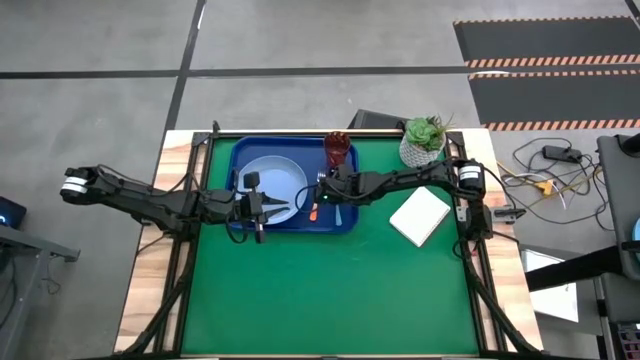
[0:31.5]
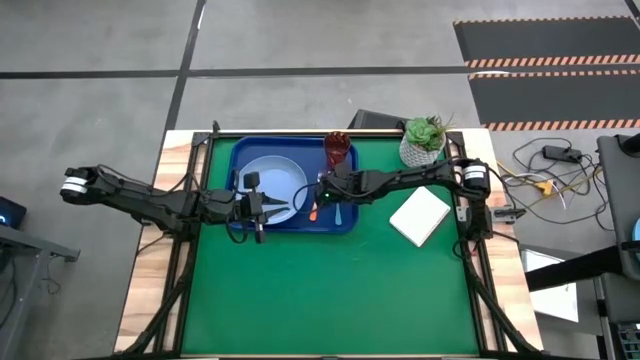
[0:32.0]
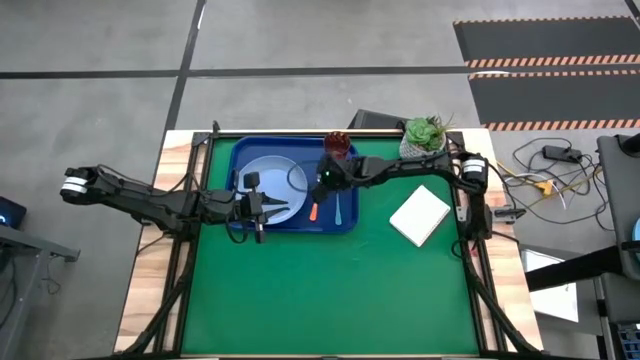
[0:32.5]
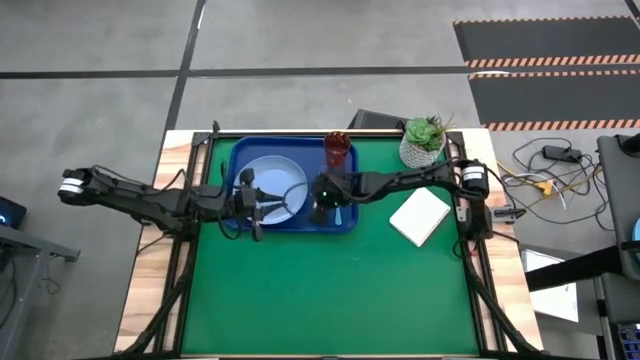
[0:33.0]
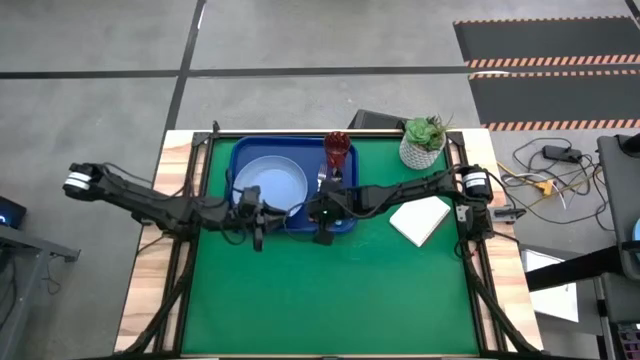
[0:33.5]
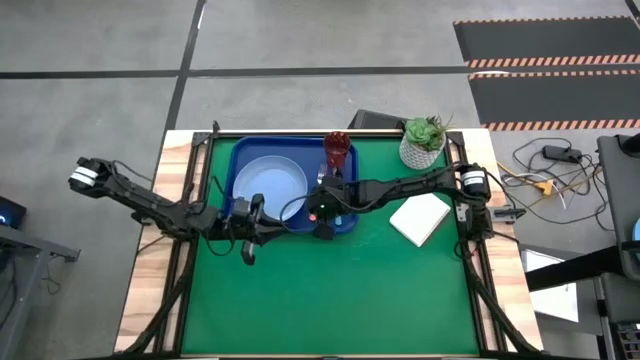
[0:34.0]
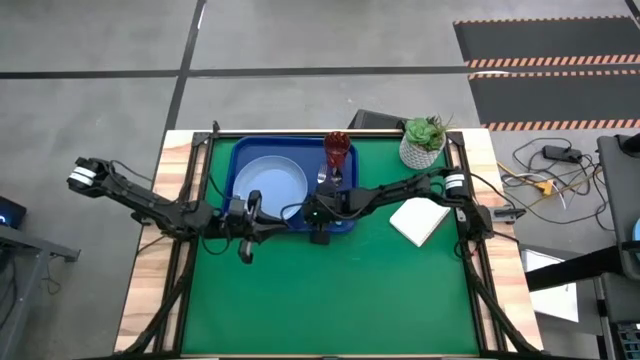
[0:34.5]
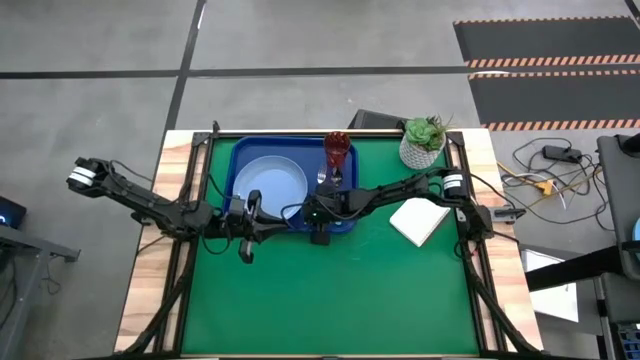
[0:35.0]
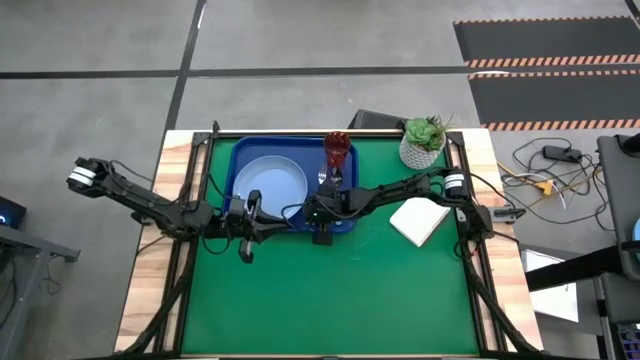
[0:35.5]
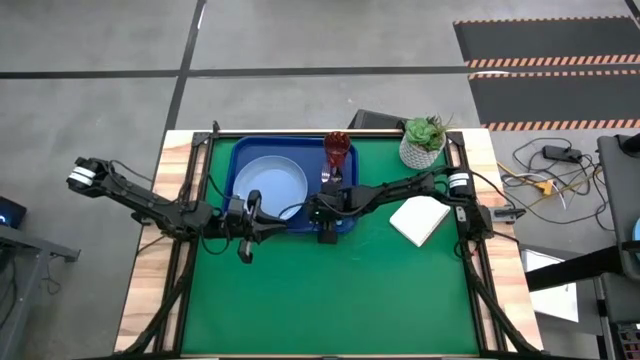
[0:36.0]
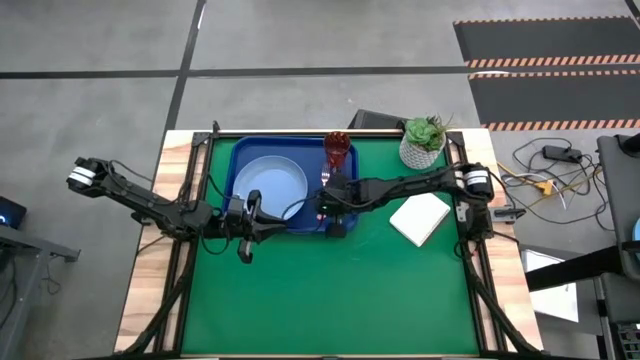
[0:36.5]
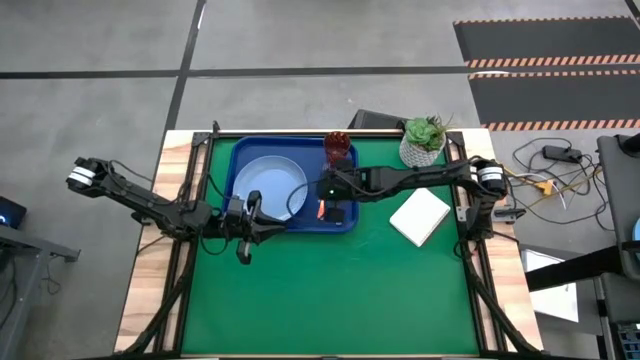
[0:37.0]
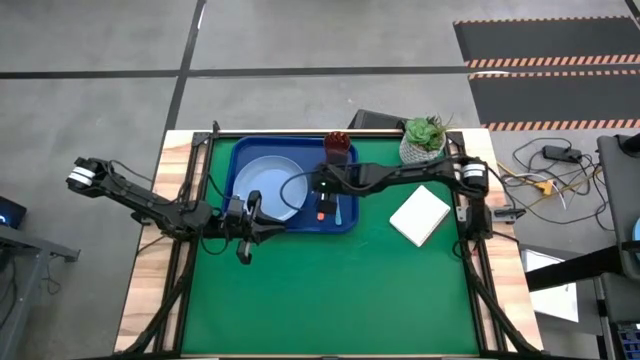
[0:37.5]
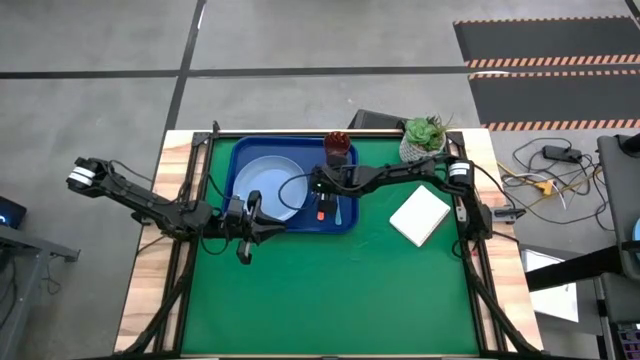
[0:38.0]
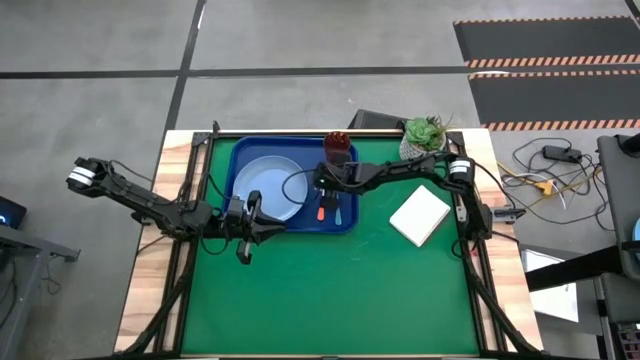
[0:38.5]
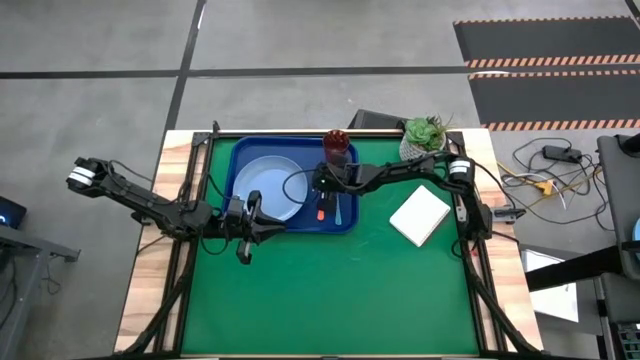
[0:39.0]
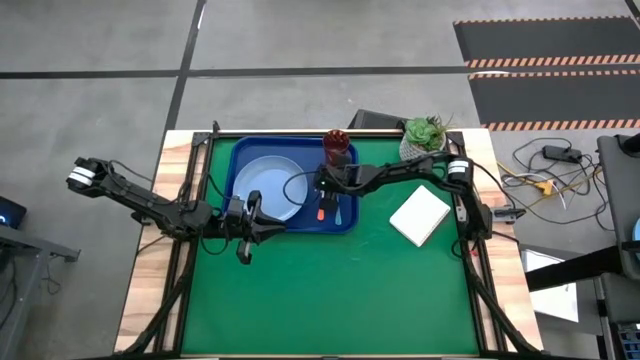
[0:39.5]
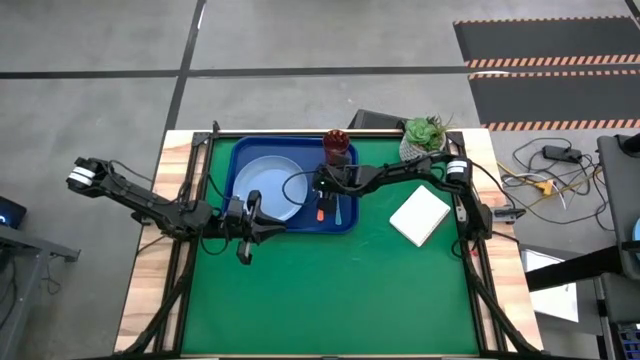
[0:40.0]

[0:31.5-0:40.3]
Task: Pick and place plate/cup/fork/spoon on tray
Adjust the orange fork on the blue tray

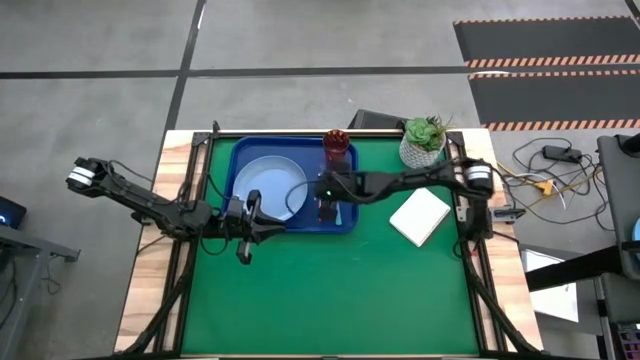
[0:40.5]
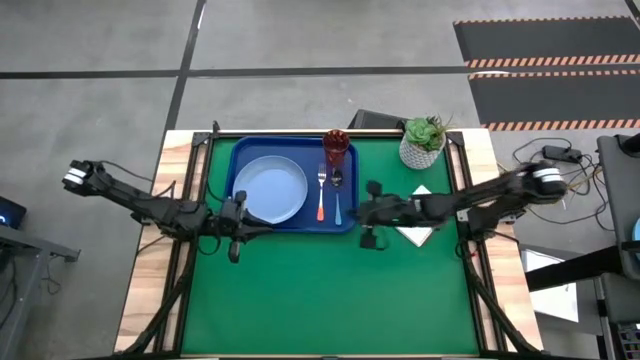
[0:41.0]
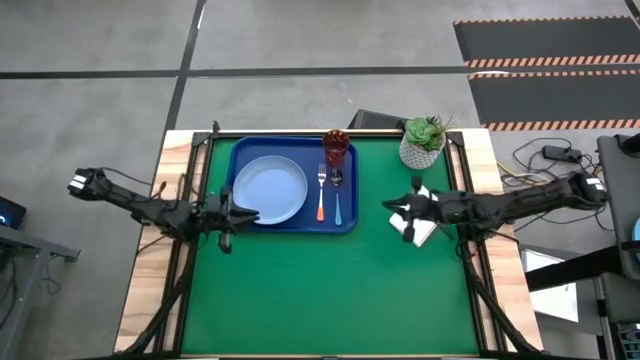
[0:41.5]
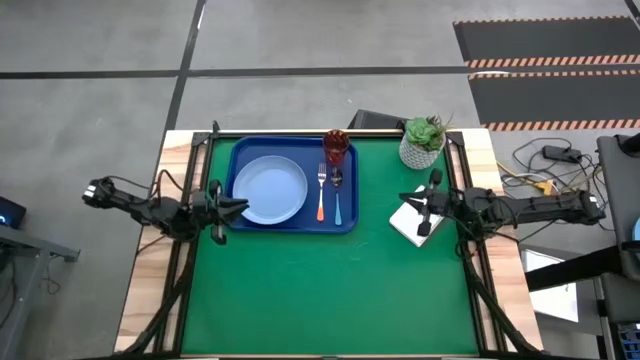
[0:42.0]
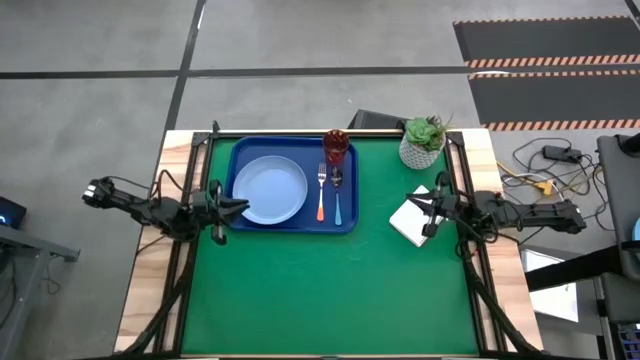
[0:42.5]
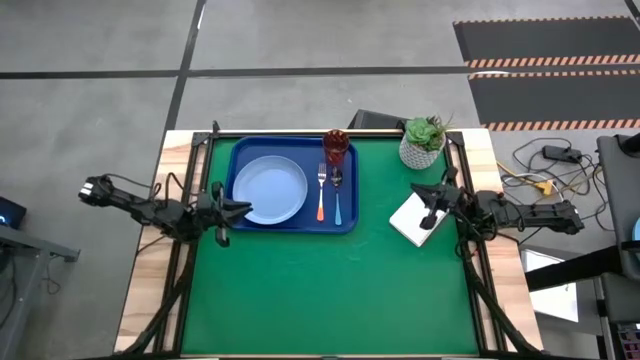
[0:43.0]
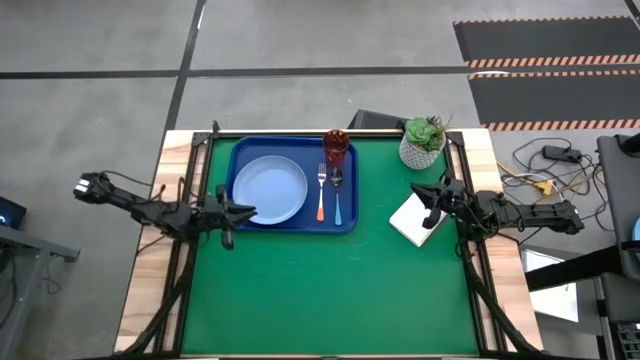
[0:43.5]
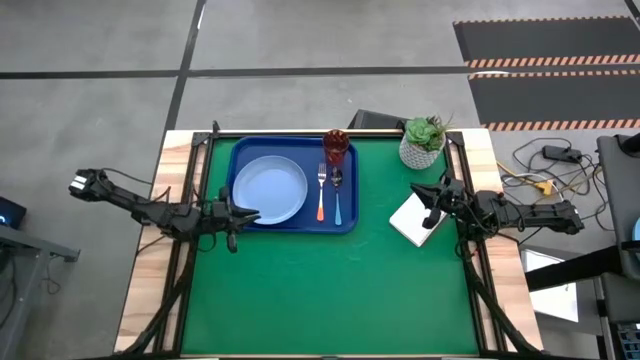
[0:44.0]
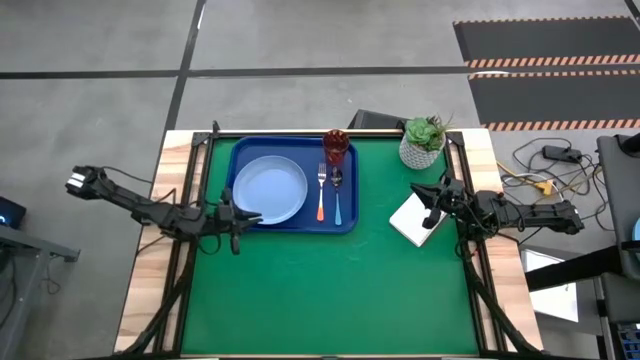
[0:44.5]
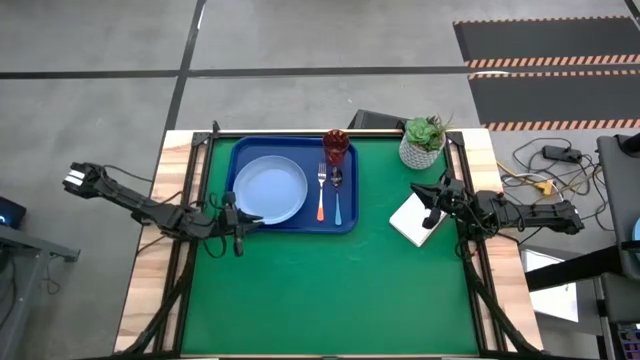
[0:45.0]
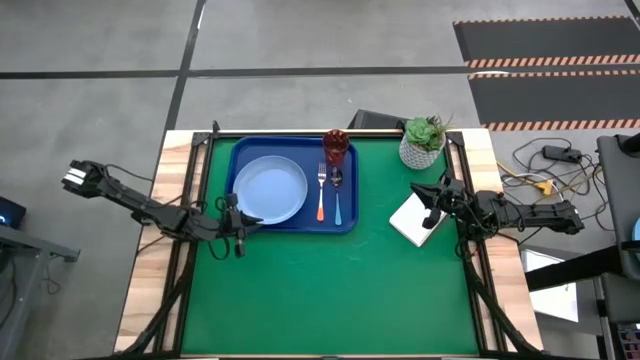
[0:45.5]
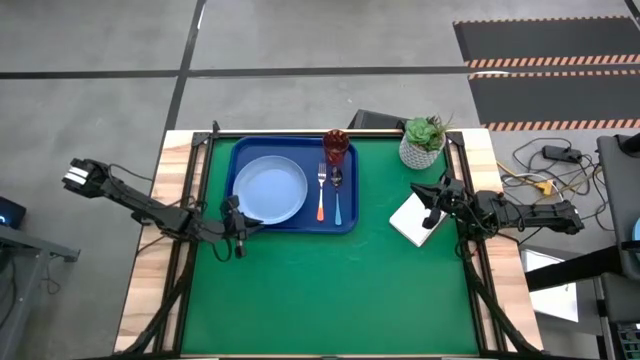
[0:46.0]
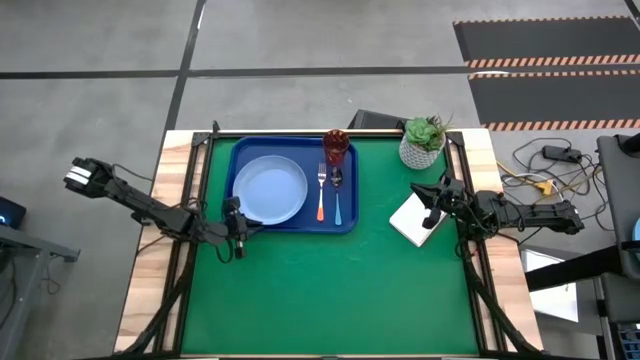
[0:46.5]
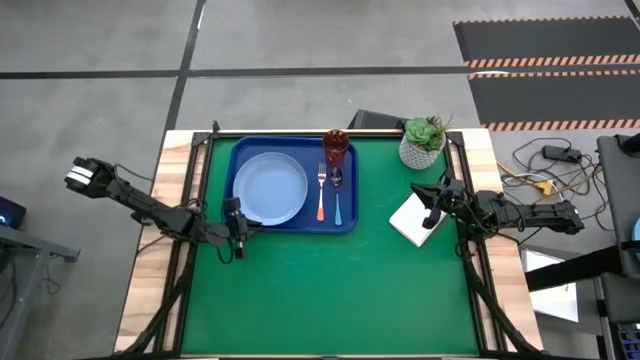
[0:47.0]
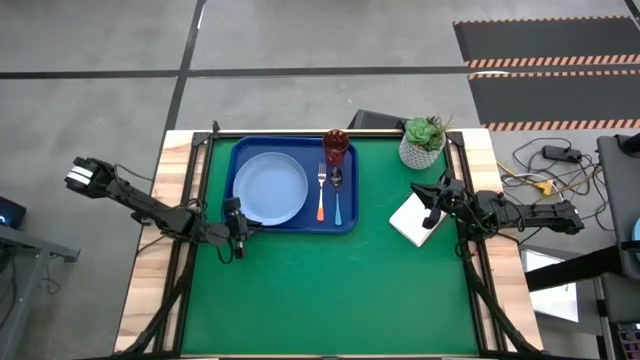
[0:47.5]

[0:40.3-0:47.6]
Return to Home Position

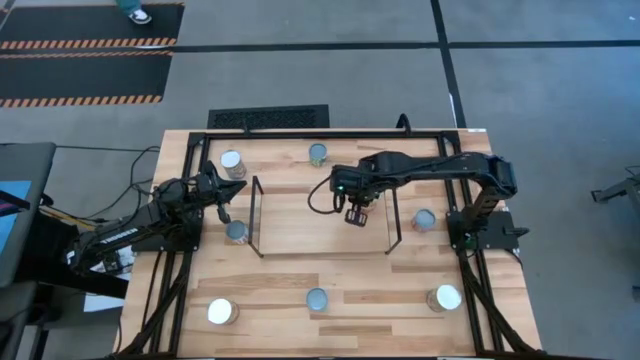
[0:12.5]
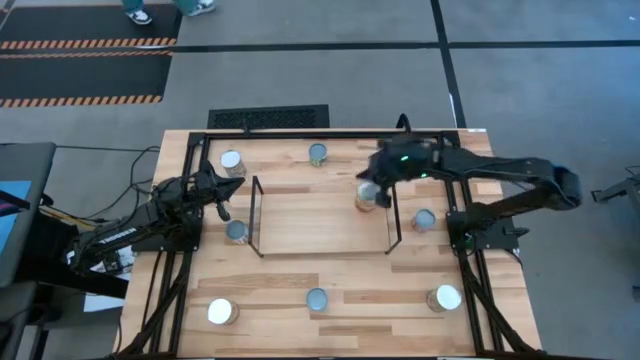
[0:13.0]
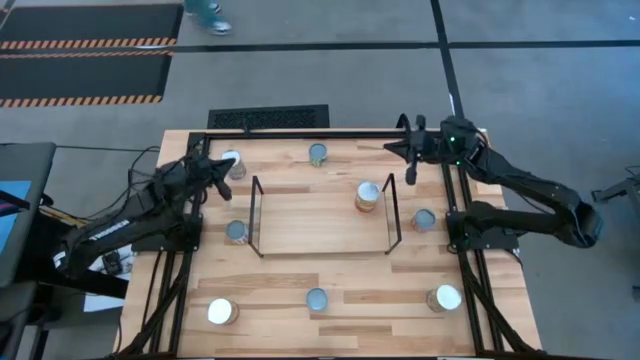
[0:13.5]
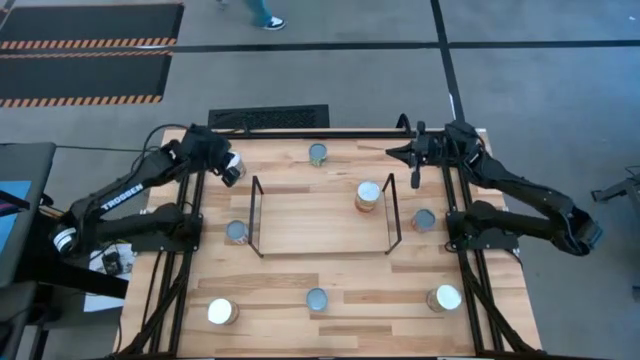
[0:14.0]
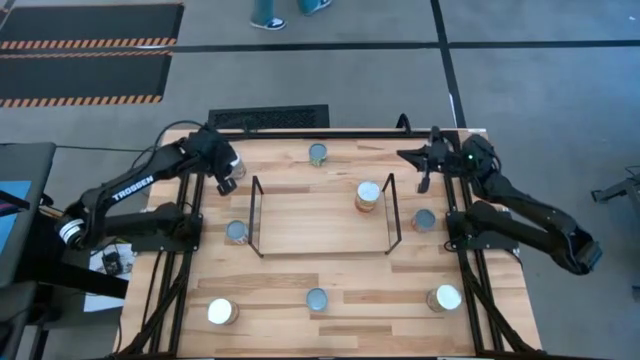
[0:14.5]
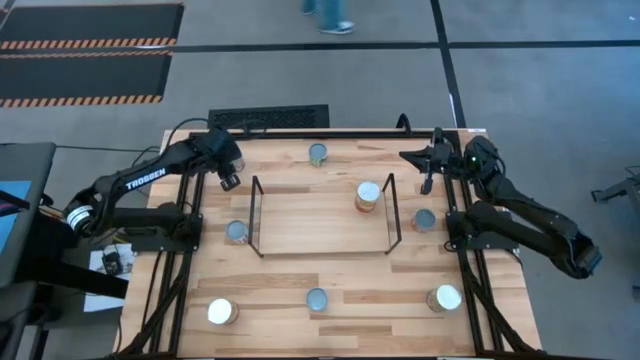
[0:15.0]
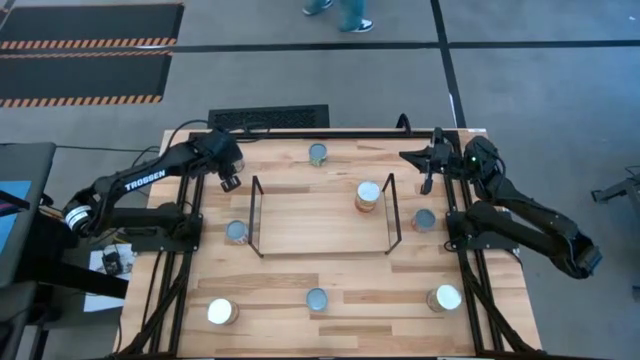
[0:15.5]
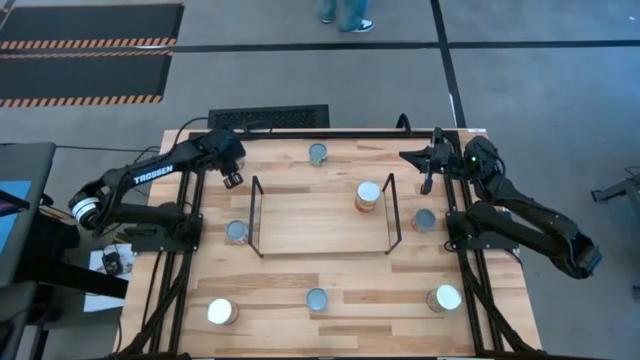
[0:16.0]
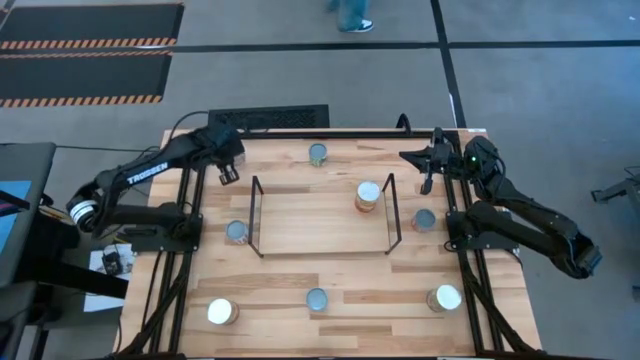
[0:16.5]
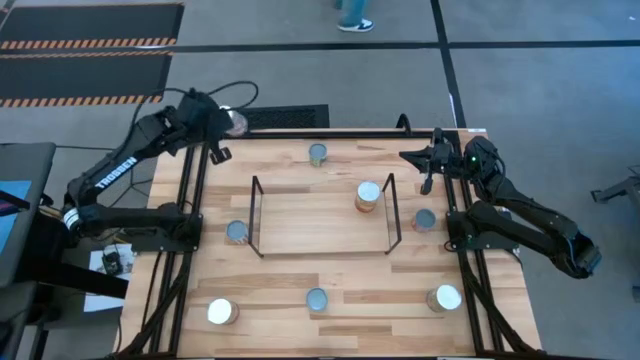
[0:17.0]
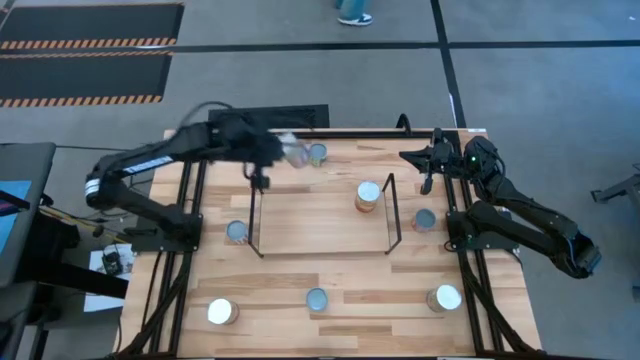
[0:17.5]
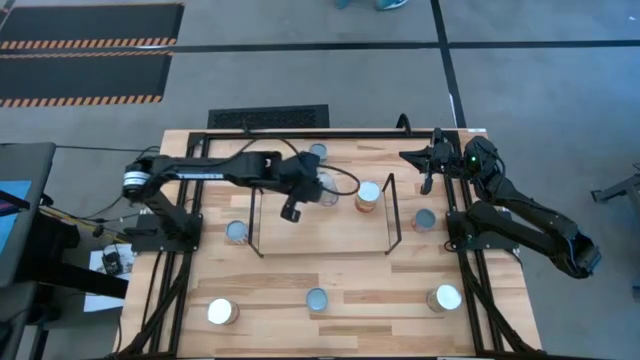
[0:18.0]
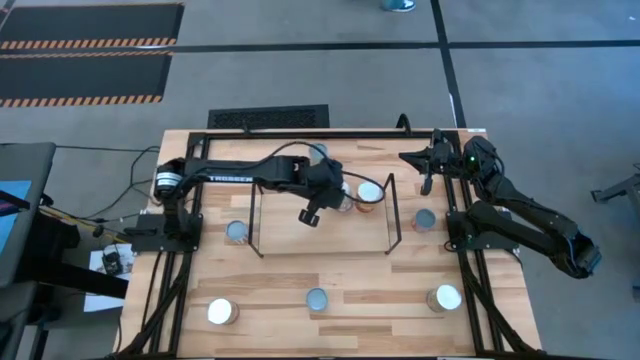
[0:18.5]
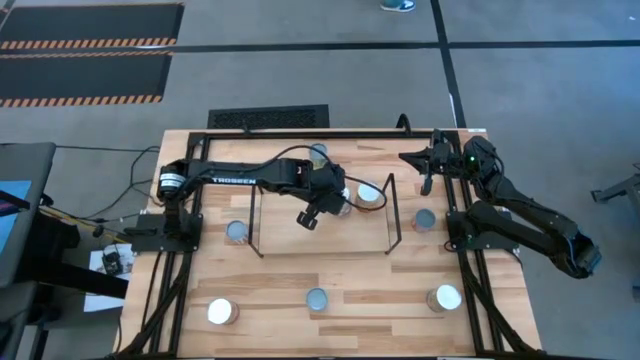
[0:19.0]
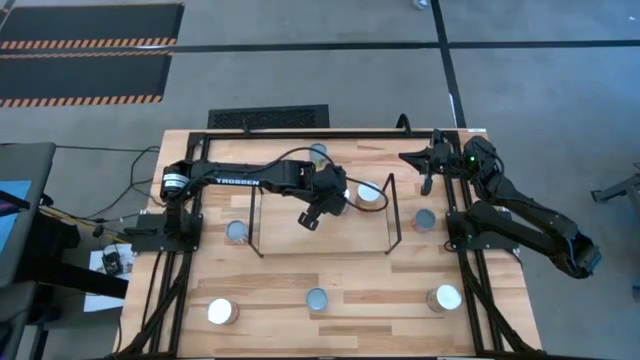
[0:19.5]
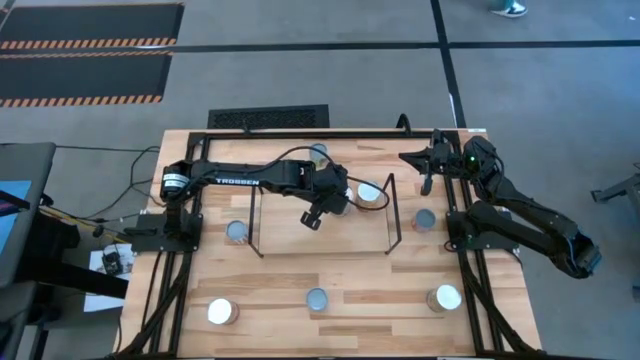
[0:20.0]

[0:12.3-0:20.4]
Task: Pick and place cans onto a shelf
Put the top canned peaches on the shelf
